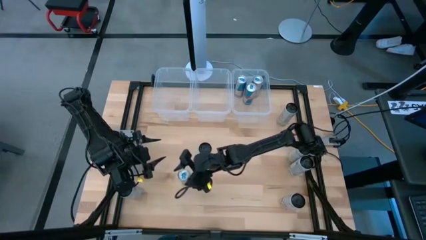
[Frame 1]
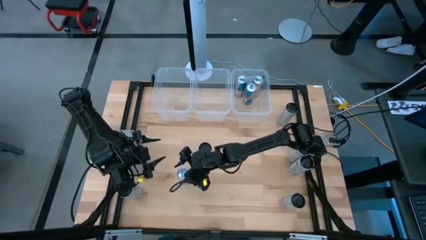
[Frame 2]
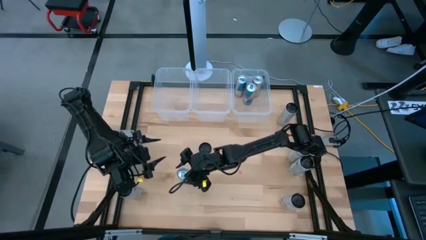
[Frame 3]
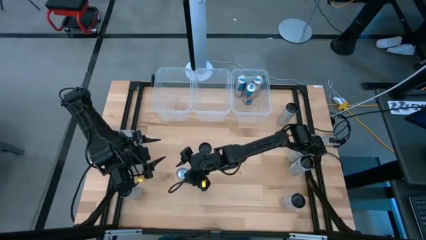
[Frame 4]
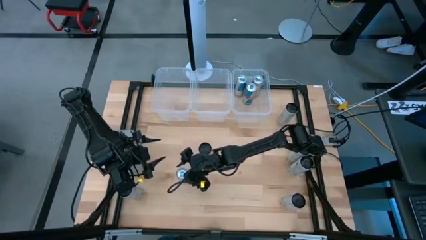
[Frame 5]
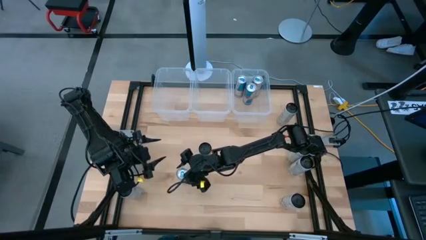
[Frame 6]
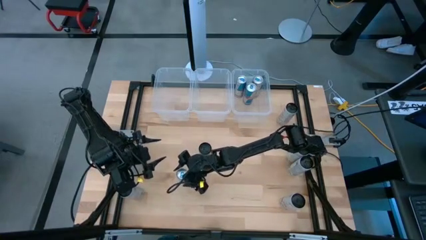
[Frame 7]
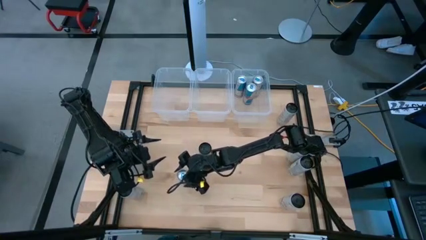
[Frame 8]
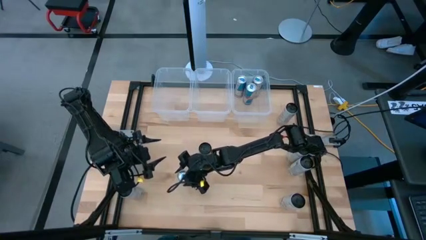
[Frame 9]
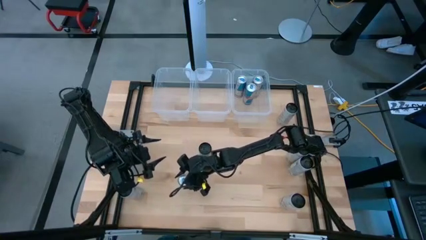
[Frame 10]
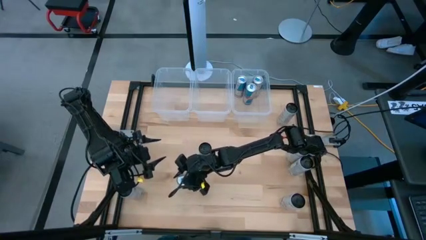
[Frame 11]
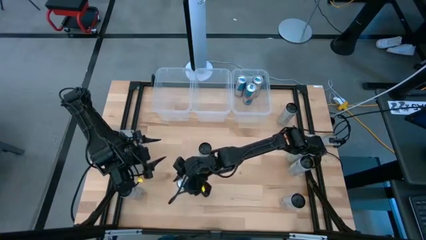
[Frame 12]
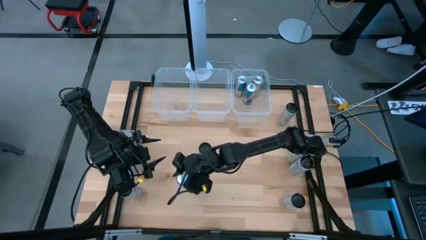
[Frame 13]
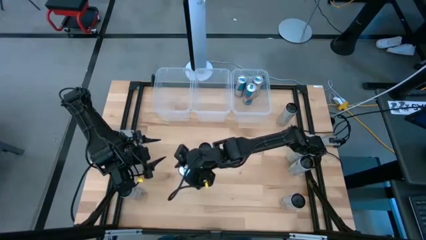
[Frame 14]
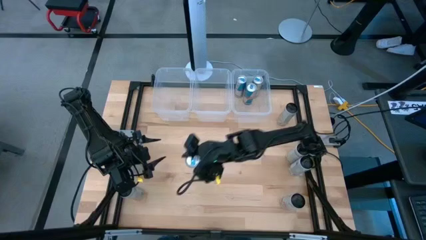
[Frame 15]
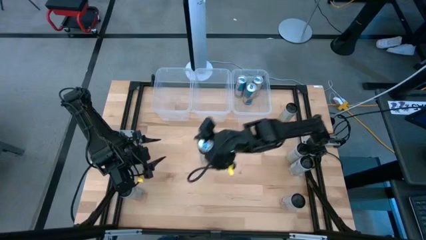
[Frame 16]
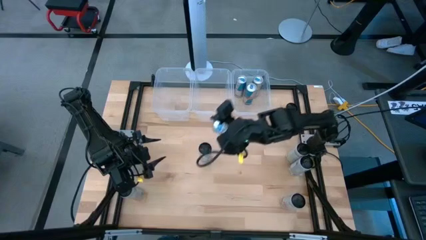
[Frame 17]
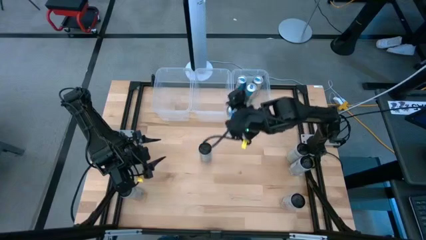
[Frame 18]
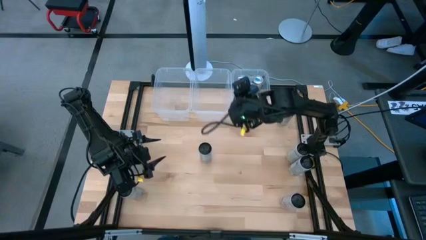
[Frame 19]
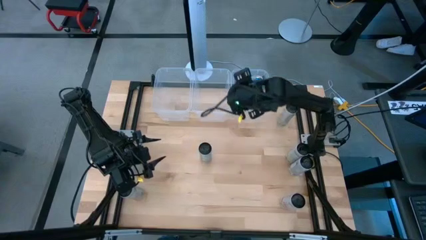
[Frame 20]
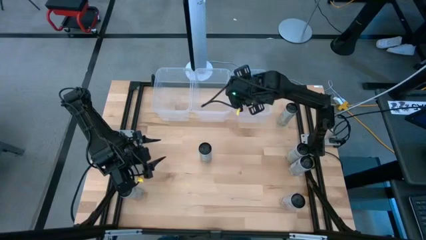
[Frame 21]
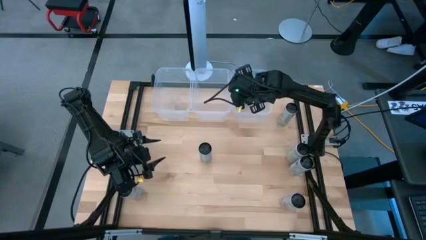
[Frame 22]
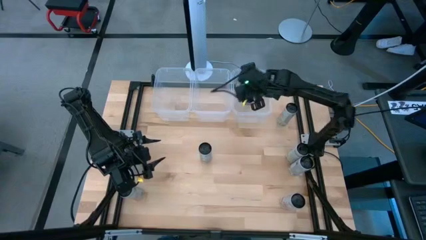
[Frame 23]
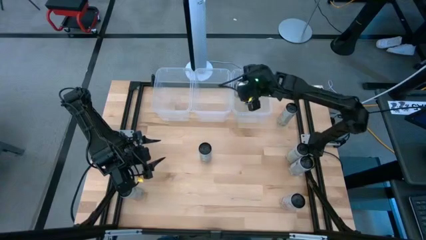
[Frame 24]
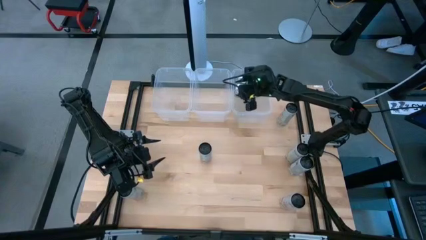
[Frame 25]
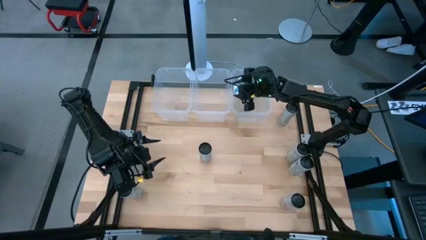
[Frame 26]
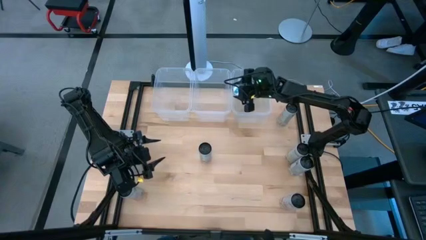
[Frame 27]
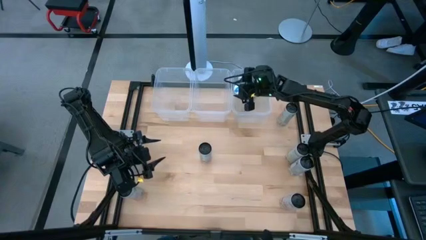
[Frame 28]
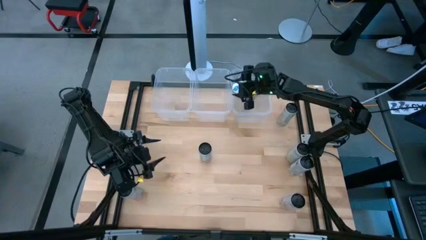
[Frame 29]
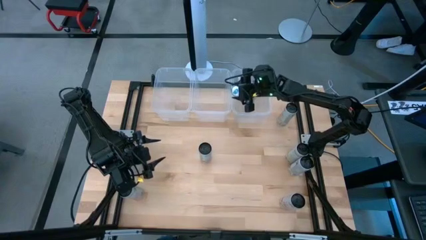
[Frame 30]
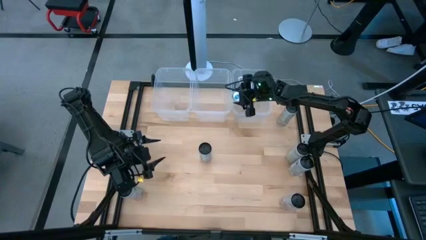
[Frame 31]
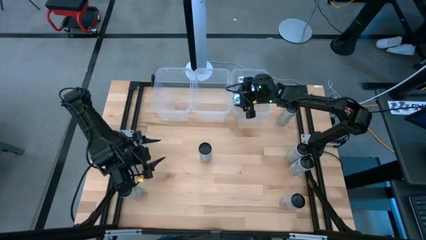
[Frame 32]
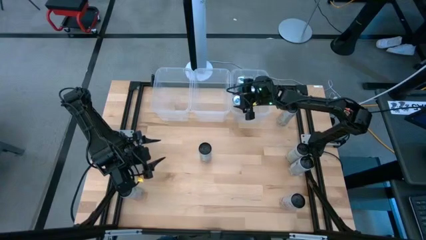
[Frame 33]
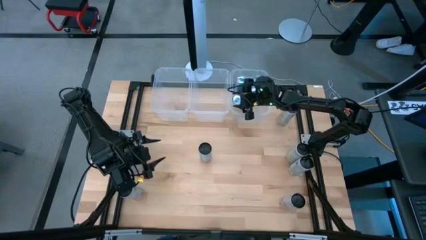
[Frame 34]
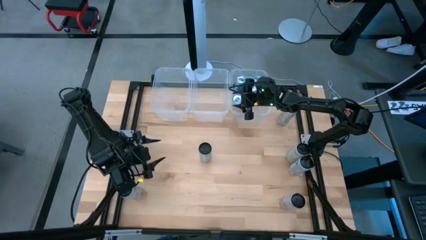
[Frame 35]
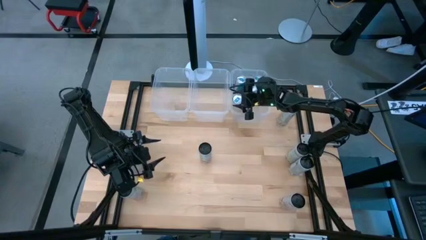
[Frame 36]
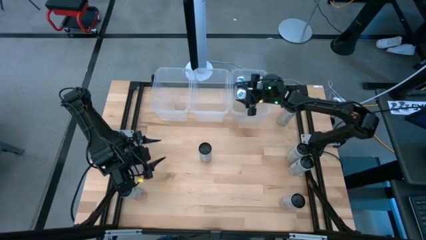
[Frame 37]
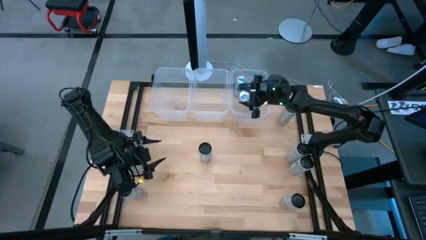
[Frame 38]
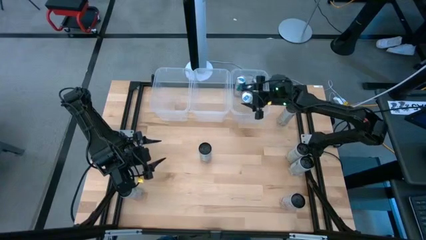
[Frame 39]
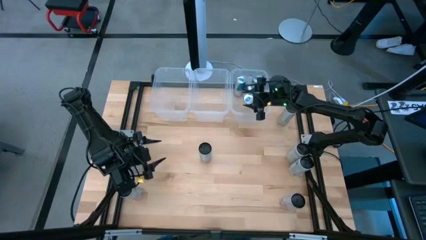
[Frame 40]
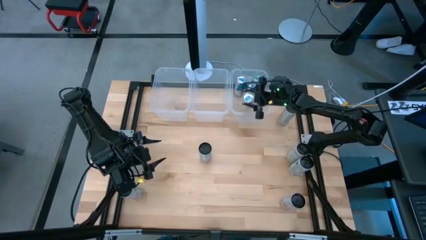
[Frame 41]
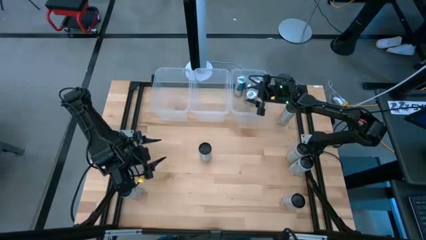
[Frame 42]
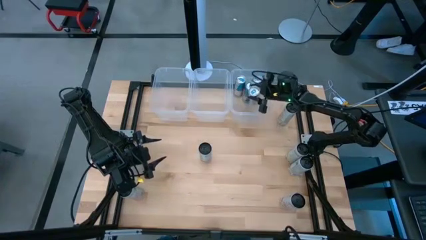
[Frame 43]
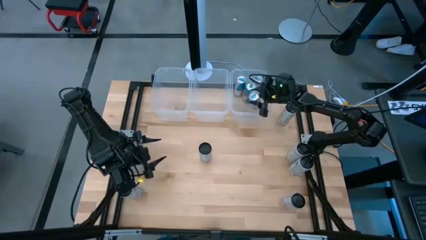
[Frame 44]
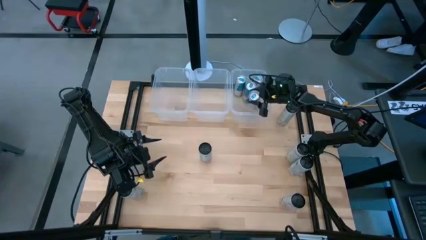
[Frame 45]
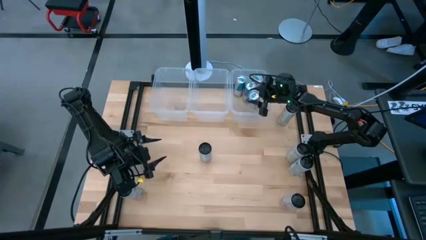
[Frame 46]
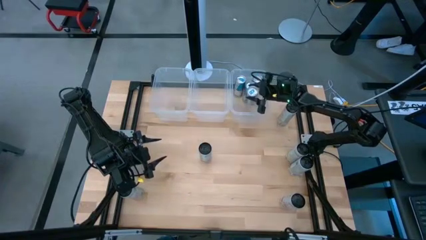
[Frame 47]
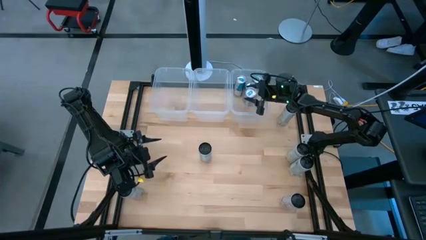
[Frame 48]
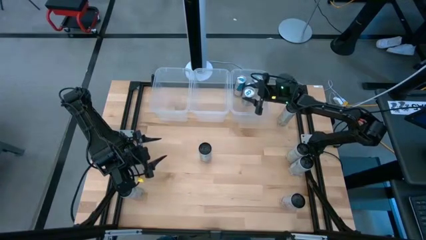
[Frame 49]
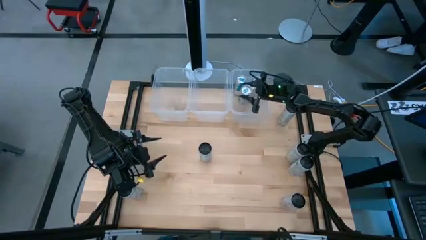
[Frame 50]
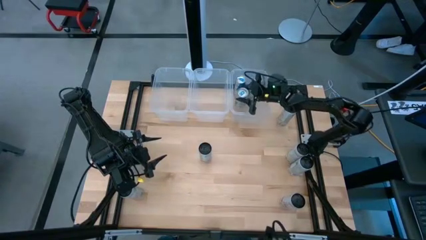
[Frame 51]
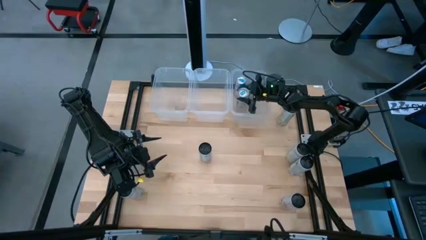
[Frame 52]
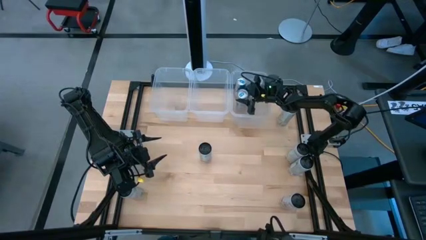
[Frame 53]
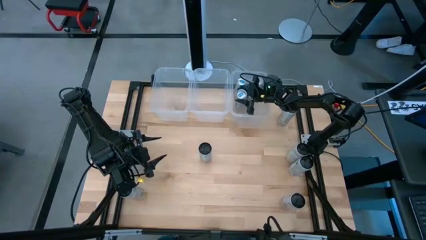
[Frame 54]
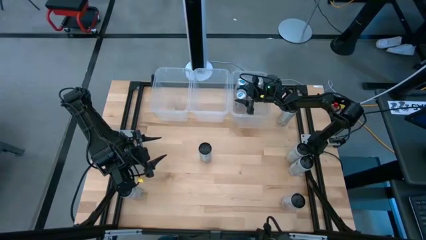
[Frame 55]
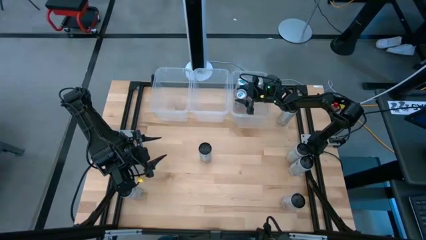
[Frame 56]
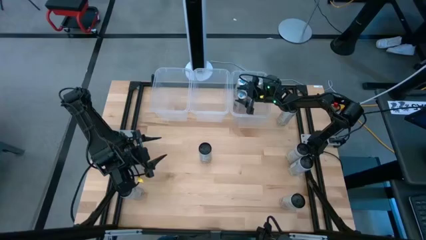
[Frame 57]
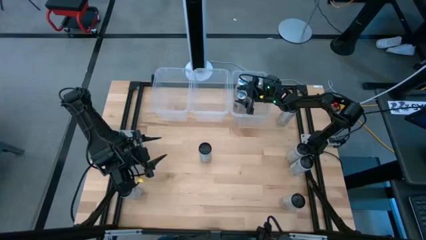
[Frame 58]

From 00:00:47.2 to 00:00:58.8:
Task: Sort soda cans
Put the blue soda can into the right transparent bin

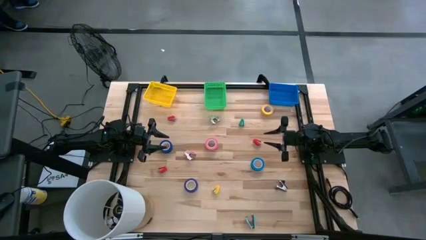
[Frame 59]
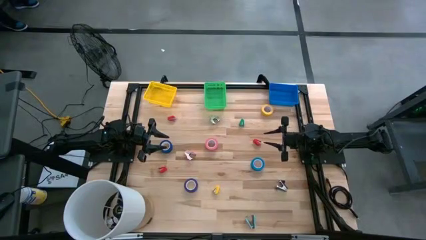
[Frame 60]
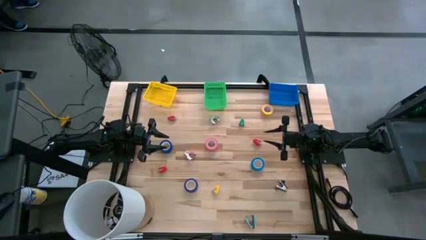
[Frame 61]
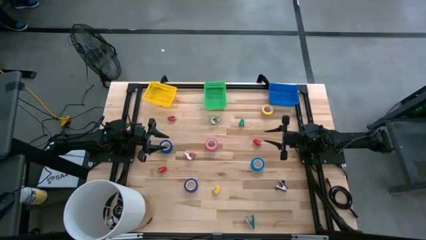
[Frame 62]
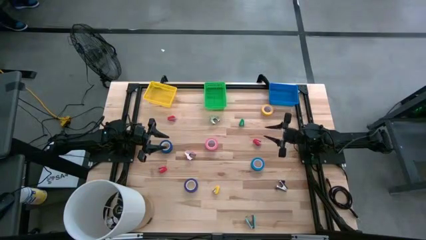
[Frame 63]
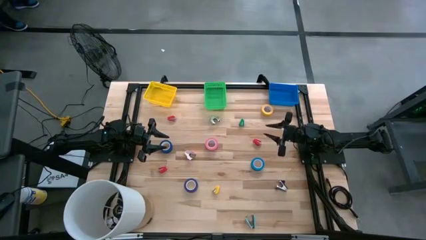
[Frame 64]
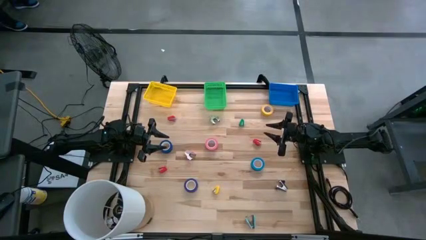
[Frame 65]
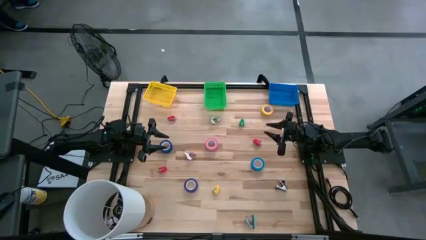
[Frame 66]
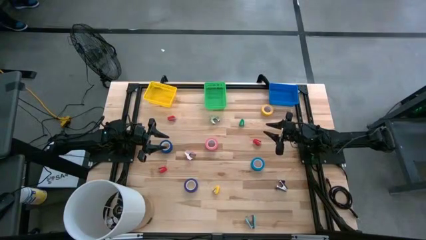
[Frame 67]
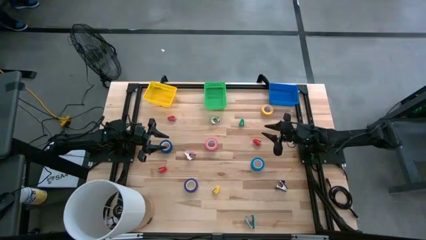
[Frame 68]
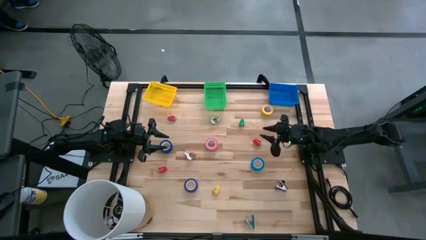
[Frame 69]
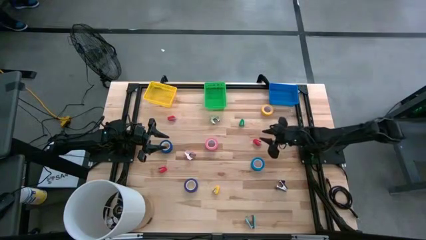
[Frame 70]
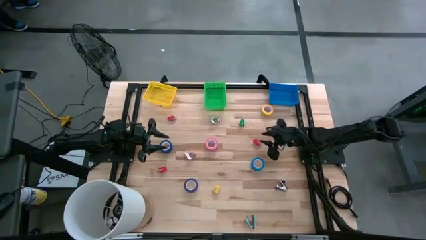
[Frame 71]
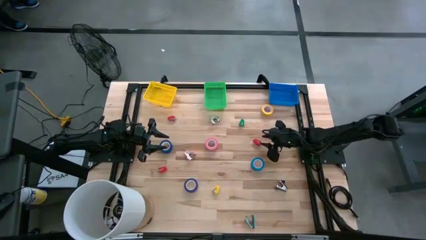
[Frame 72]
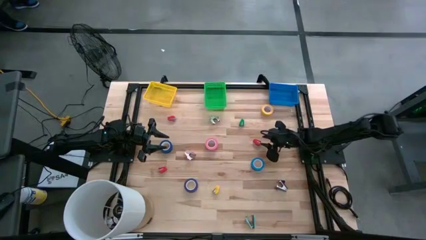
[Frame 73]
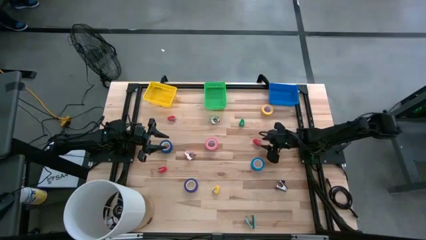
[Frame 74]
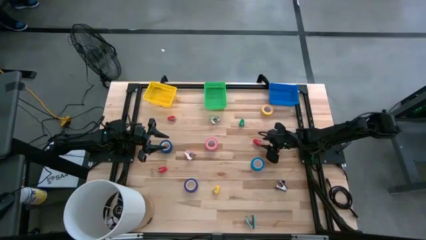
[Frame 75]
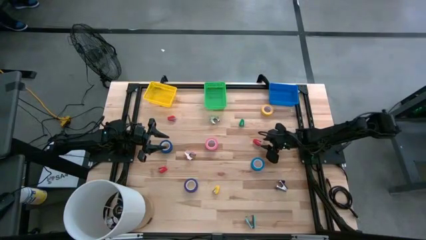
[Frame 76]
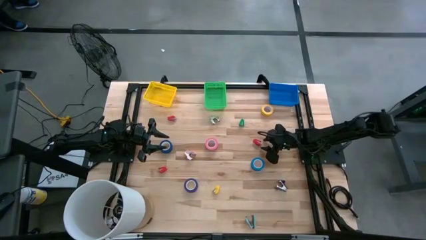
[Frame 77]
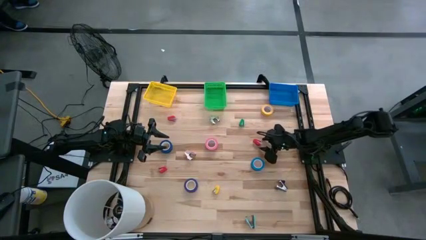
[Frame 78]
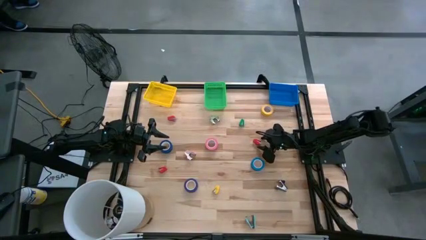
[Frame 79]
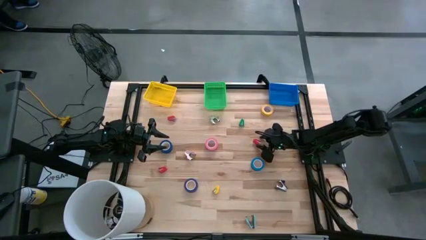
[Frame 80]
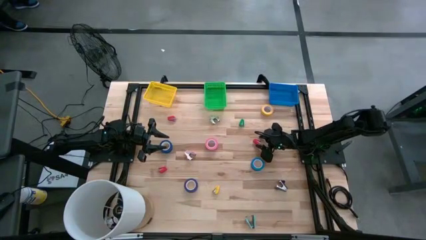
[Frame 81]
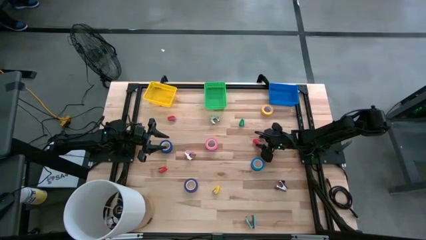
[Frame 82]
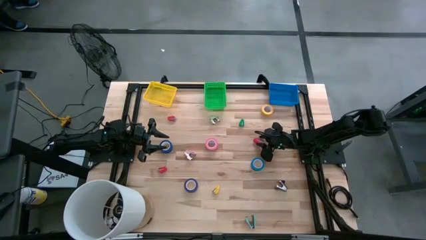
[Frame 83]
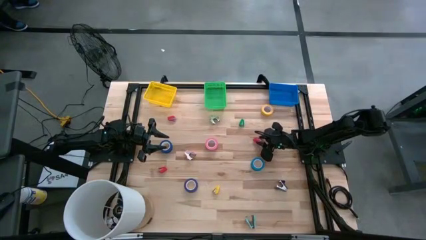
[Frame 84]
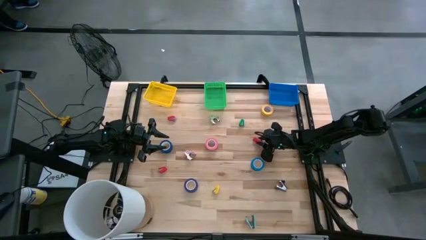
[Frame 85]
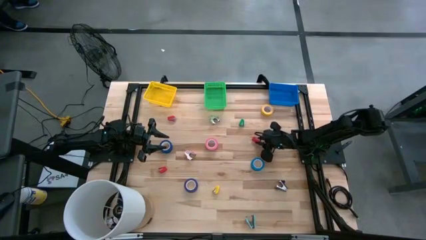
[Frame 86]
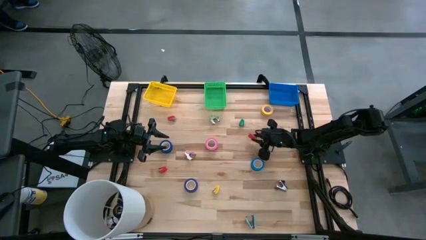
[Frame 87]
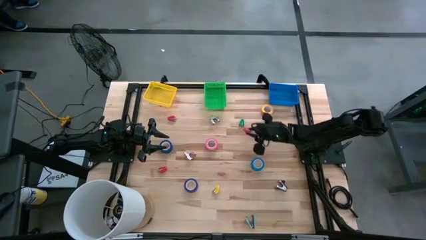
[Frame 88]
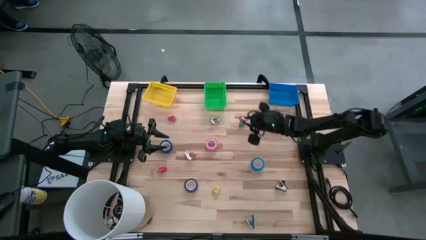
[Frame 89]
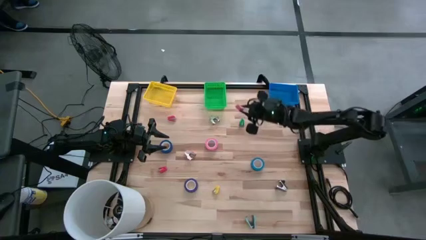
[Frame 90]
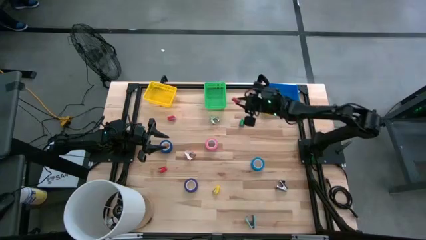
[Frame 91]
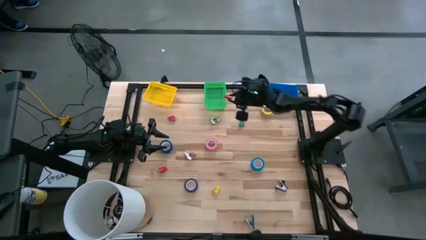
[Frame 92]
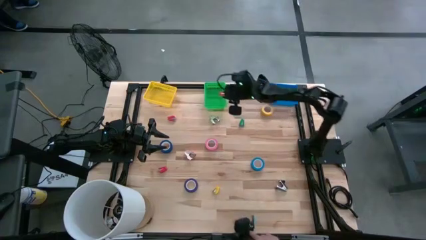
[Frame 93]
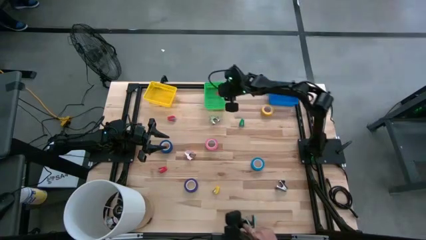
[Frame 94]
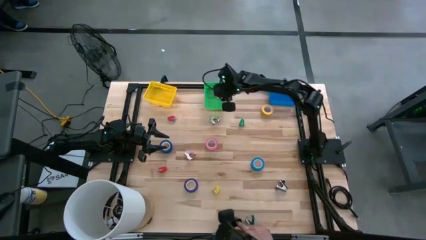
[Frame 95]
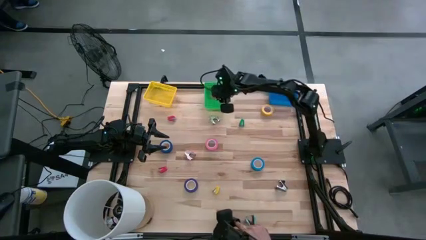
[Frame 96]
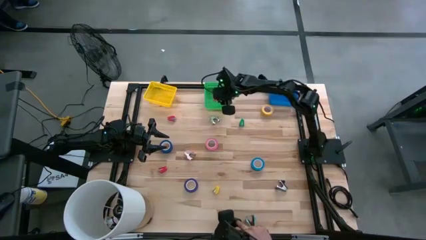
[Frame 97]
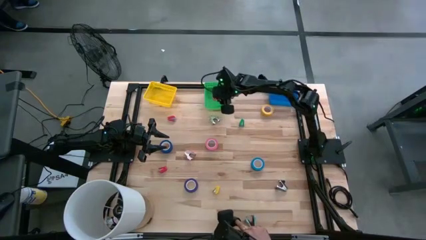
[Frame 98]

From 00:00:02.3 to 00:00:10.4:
Task: Pick and place Stapler, Stapler remover, tape
Put the right red stapler into the green basket
